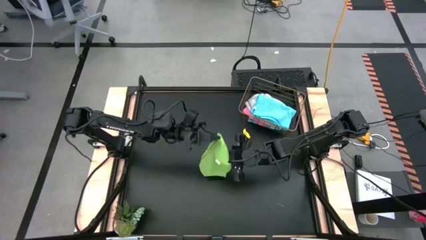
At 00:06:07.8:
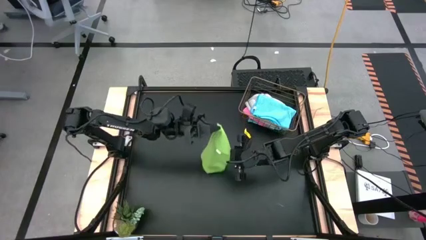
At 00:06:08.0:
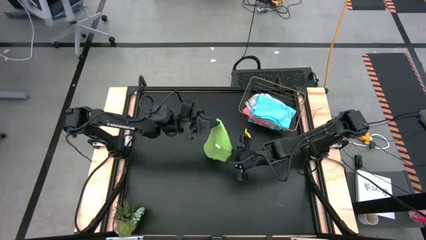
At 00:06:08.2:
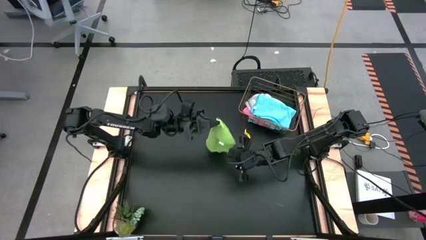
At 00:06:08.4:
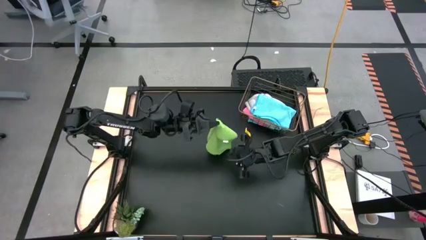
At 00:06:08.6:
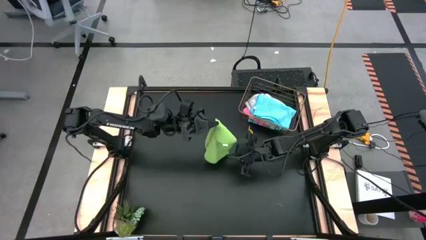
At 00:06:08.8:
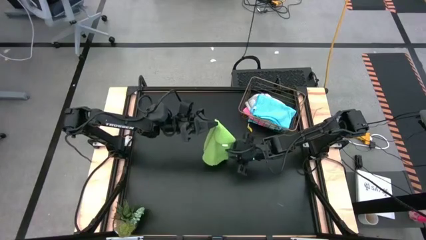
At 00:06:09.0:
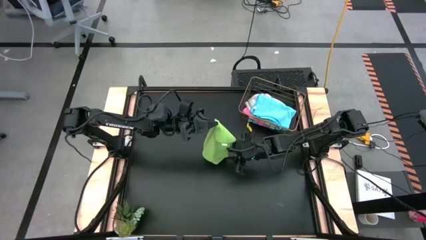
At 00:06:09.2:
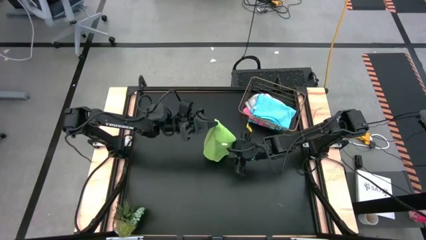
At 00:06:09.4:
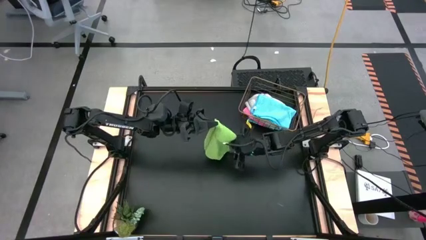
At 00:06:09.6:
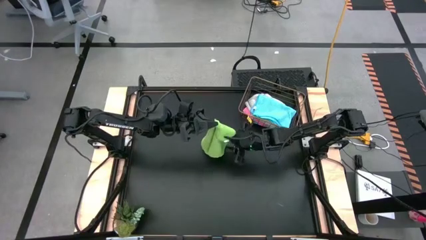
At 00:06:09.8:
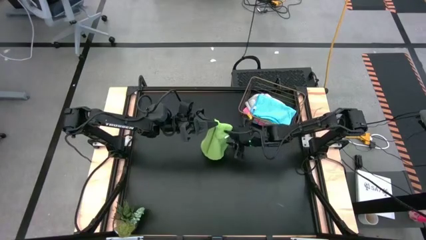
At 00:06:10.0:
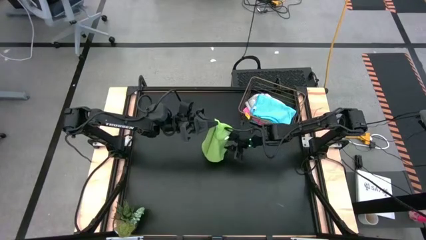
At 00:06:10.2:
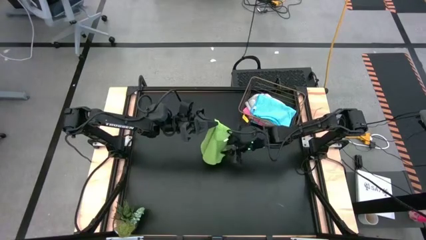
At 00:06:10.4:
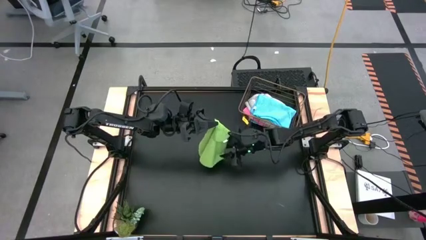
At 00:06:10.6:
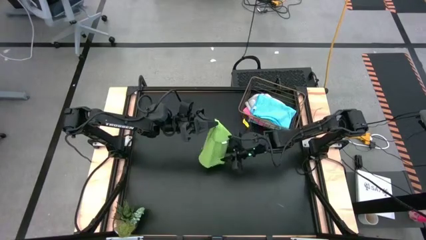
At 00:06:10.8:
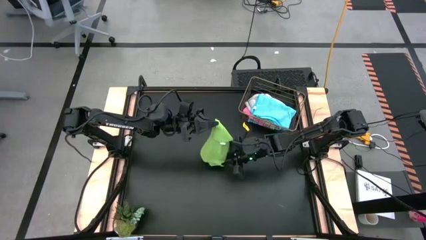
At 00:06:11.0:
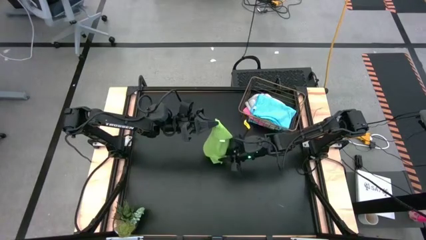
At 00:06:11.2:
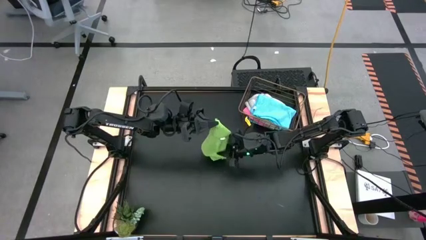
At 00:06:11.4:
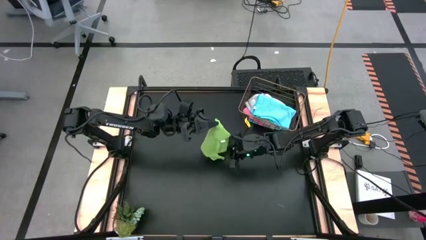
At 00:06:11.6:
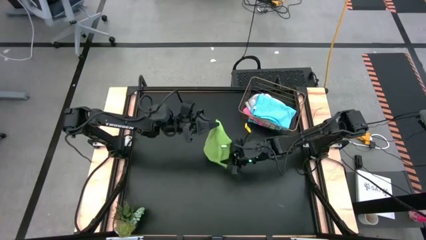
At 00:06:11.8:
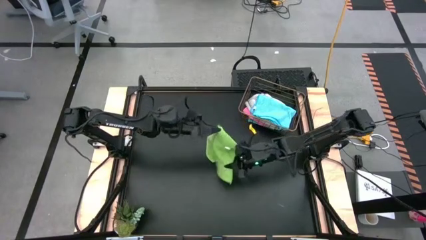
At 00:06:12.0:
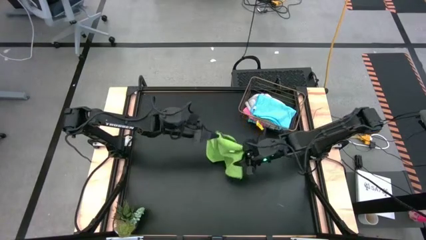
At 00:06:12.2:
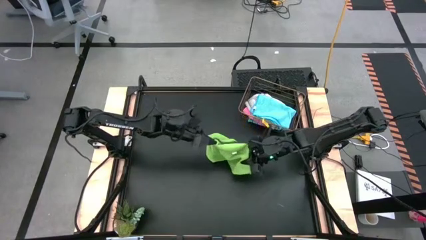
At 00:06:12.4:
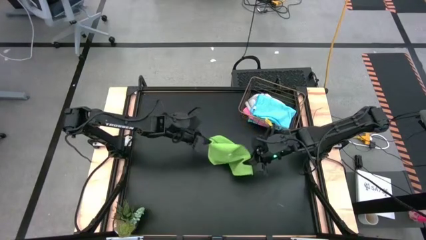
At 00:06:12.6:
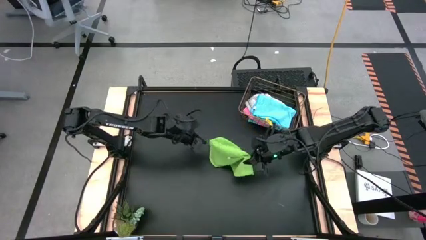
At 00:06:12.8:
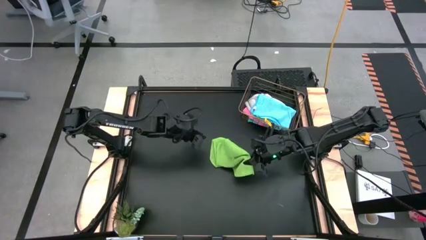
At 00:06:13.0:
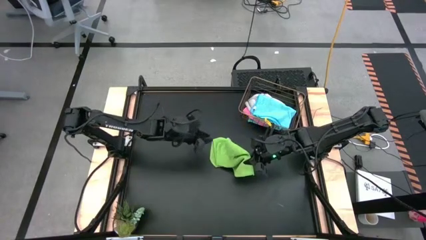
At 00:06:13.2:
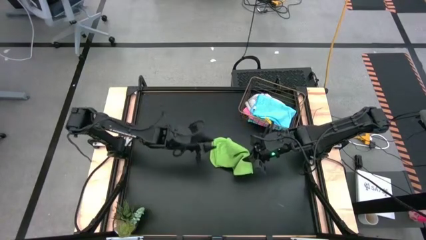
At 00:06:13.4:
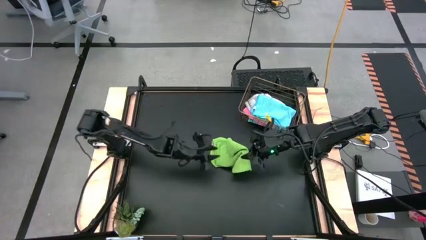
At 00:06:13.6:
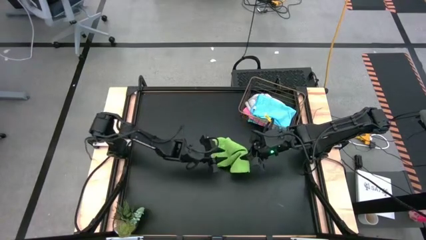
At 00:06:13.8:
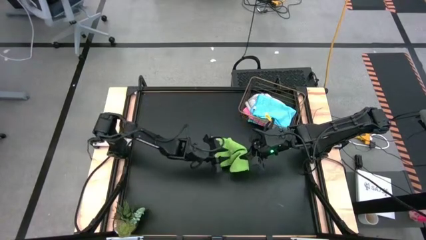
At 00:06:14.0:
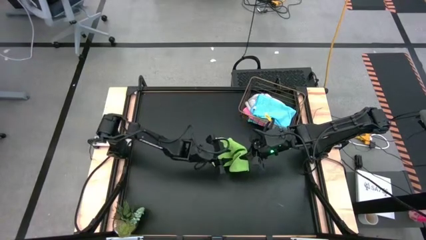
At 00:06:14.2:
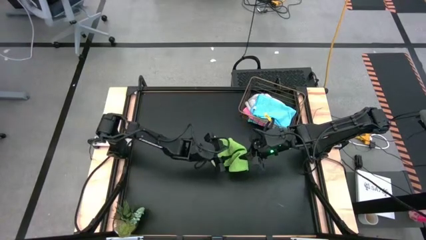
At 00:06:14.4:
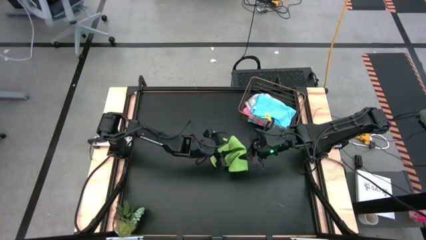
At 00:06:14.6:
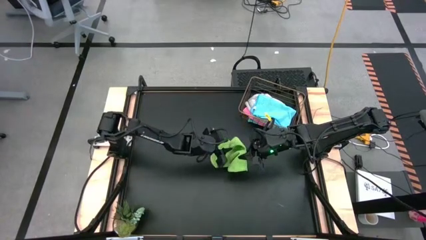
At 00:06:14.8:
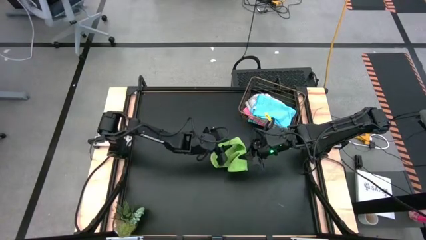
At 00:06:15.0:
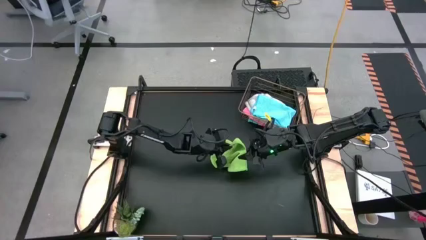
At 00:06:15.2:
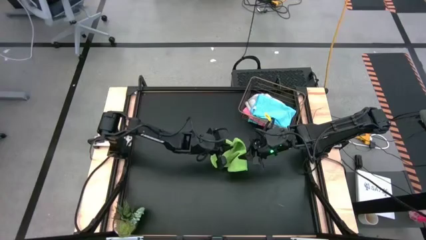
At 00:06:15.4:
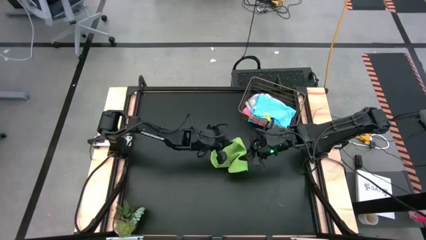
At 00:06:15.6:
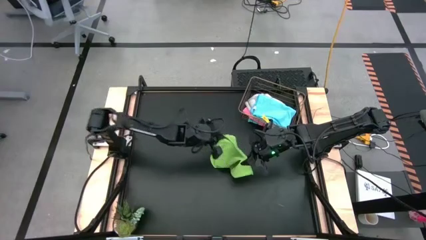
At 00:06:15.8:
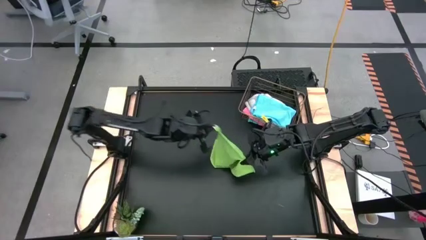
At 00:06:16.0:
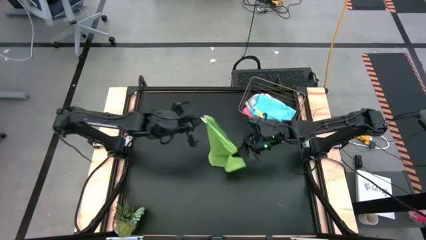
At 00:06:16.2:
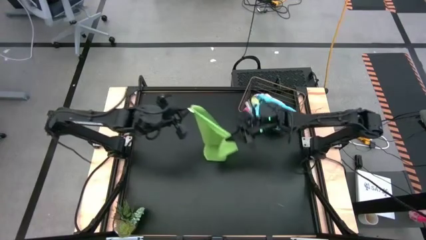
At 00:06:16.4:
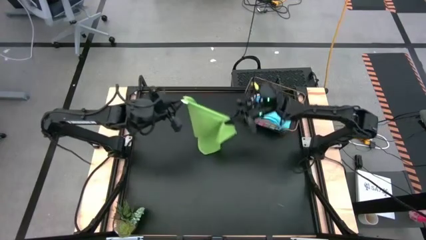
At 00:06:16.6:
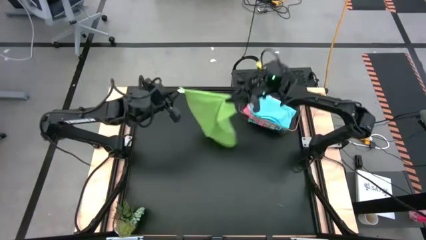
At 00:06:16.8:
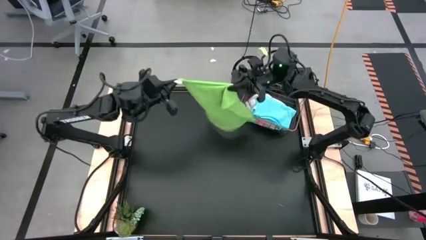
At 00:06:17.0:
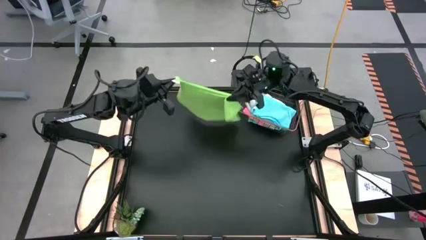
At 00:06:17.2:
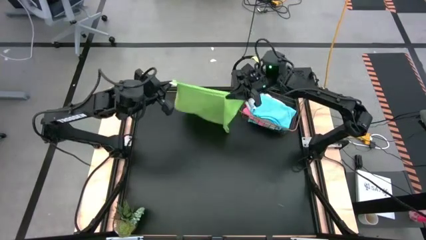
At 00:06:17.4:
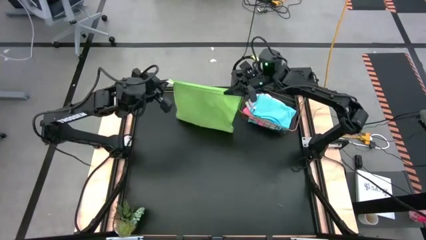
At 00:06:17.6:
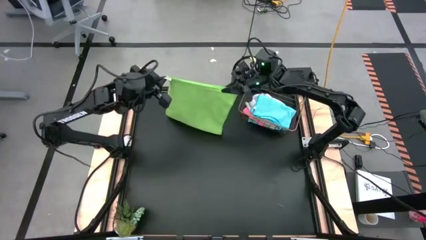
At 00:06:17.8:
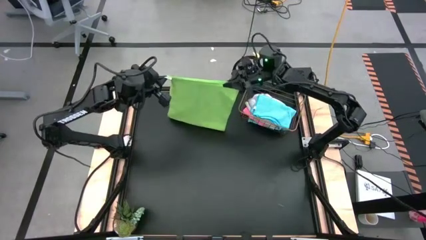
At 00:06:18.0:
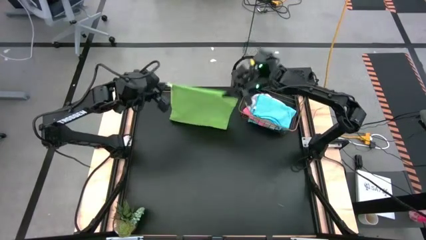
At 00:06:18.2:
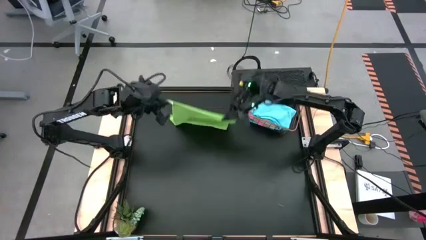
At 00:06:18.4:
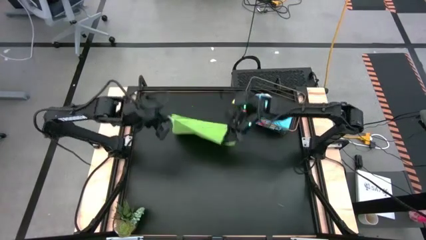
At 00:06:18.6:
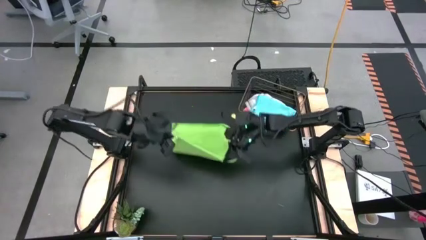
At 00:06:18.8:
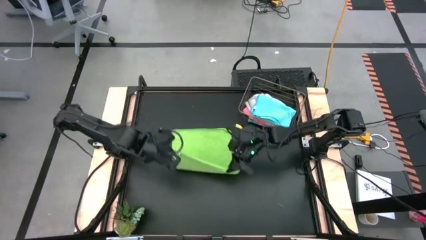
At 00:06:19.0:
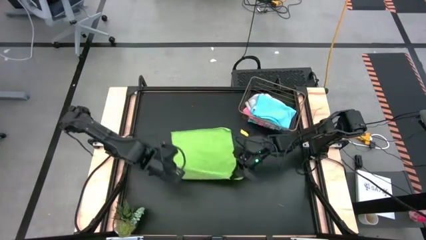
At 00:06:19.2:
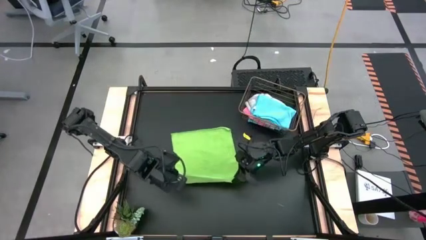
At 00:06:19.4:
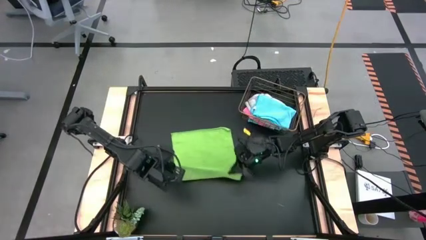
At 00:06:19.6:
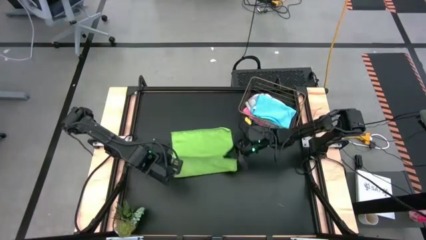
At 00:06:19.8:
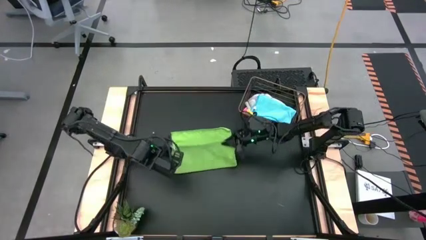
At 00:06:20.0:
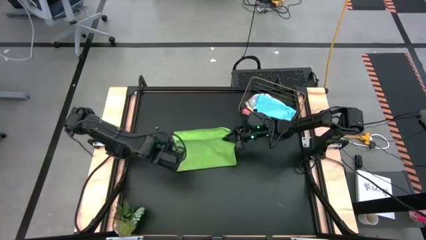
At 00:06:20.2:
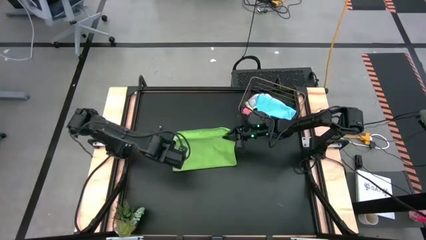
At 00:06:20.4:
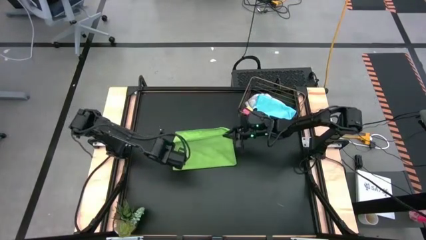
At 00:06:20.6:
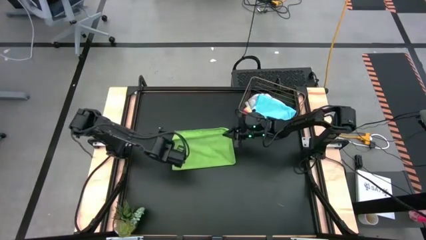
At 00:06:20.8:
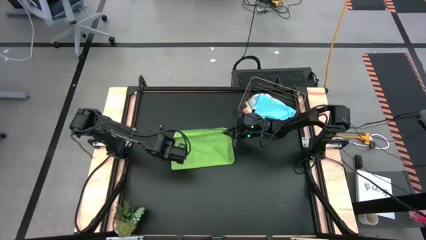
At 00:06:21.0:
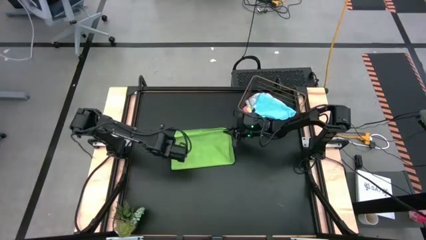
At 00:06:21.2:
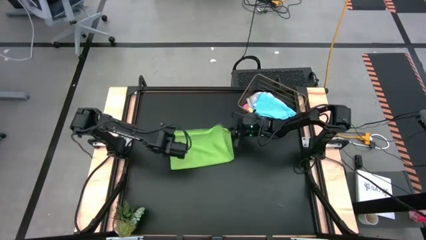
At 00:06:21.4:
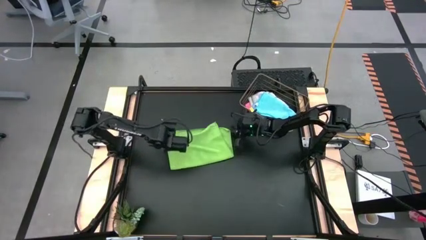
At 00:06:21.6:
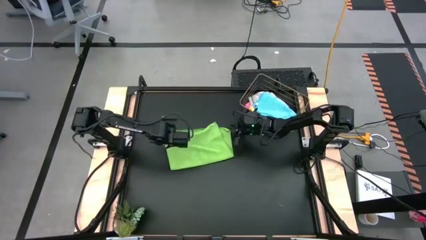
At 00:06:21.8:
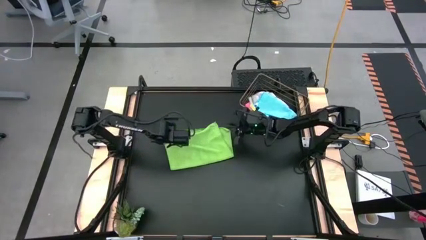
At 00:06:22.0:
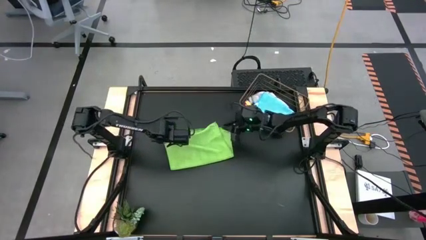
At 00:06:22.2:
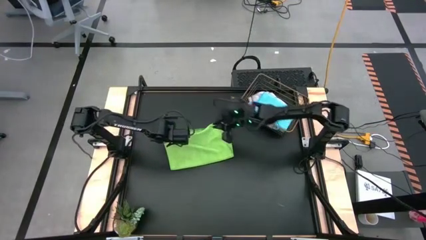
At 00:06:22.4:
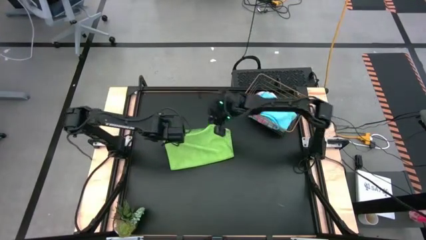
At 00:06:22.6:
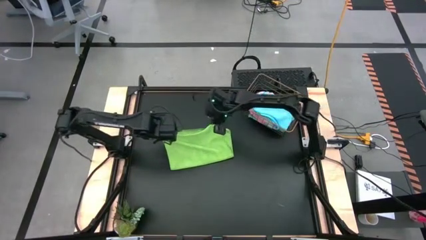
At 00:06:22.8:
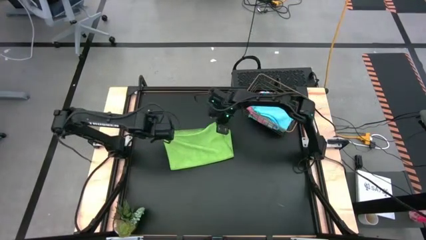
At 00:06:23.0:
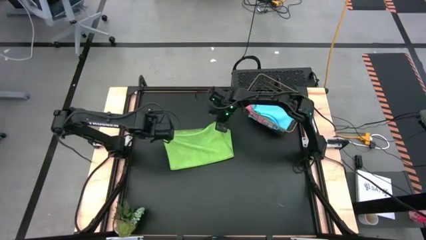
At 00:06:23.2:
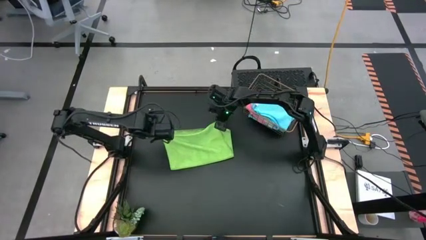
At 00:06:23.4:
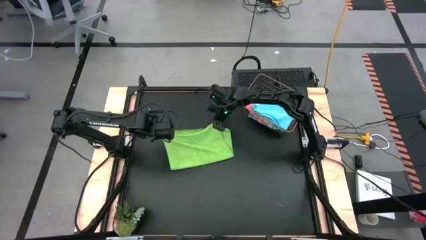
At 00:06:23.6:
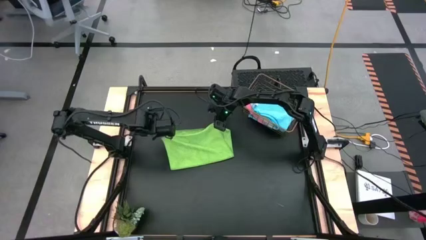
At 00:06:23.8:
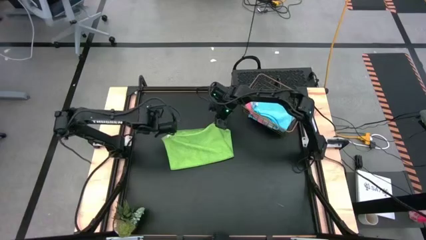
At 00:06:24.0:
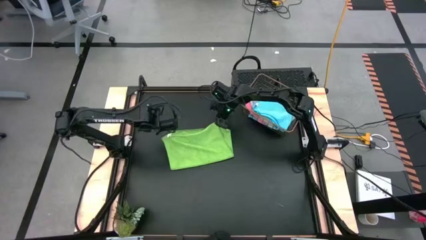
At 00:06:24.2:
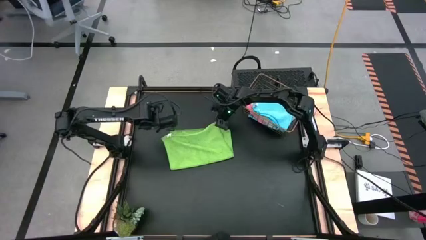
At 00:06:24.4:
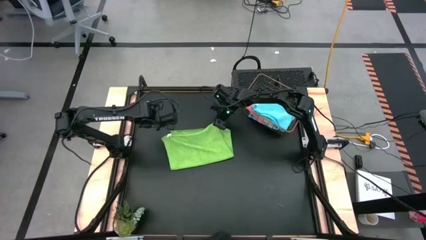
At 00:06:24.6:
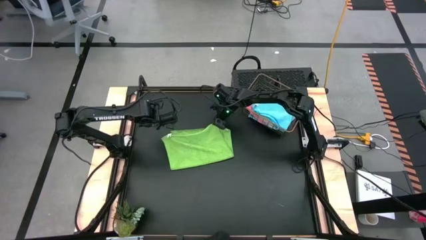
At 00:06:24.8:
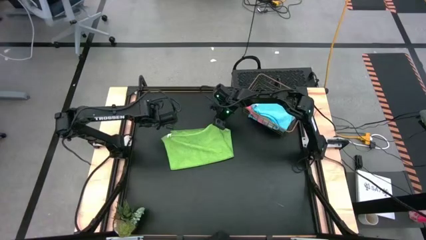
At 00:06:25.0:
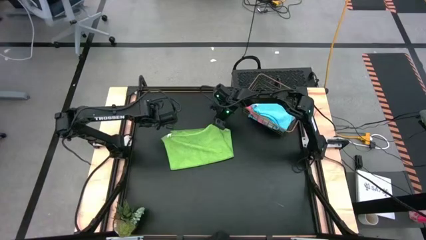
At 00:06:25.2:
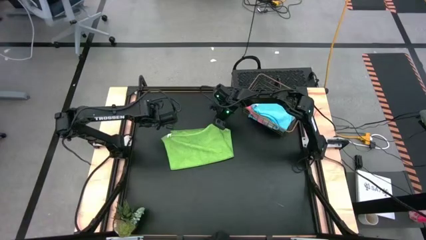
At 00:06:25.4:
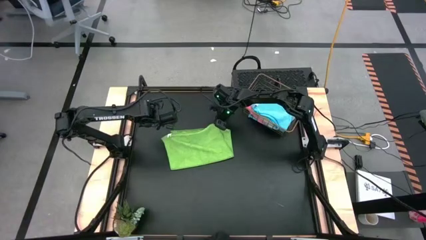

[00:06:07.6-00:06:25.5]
Task: Fold microfiber towels
Fold the green towel
